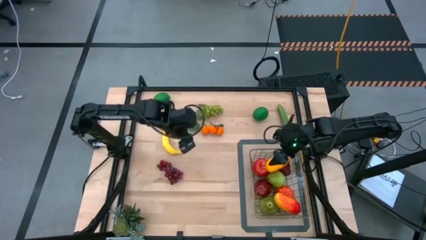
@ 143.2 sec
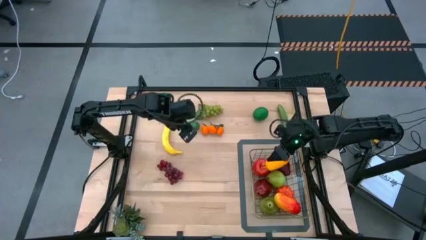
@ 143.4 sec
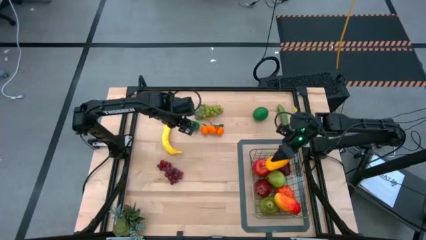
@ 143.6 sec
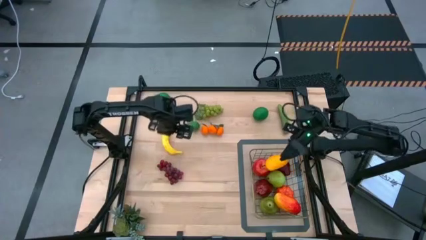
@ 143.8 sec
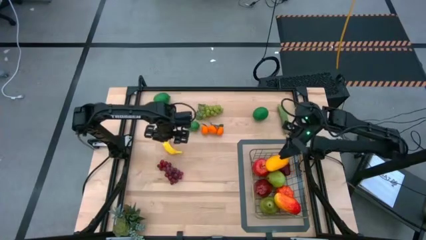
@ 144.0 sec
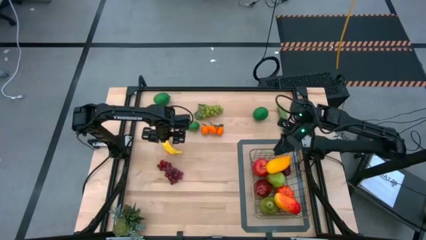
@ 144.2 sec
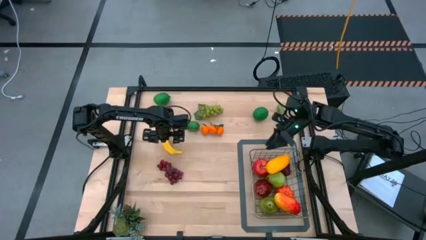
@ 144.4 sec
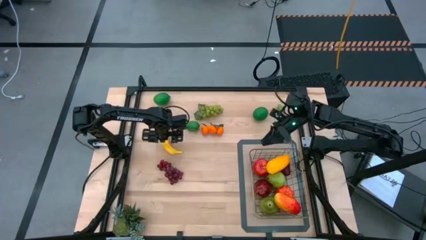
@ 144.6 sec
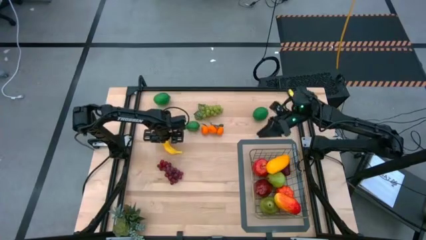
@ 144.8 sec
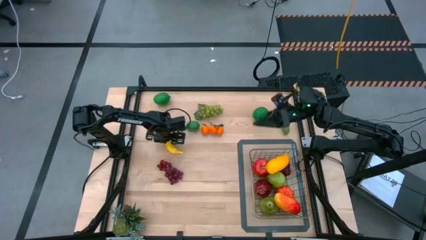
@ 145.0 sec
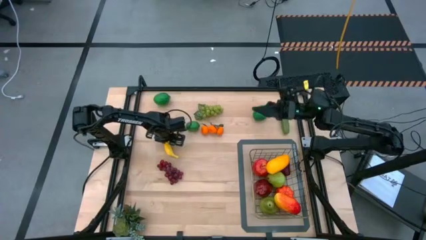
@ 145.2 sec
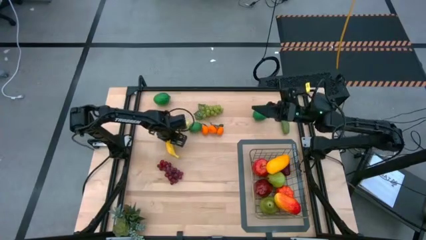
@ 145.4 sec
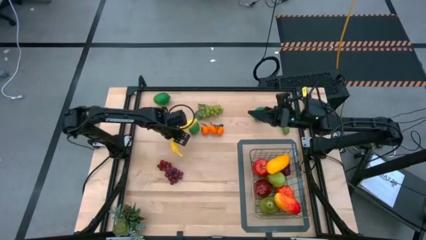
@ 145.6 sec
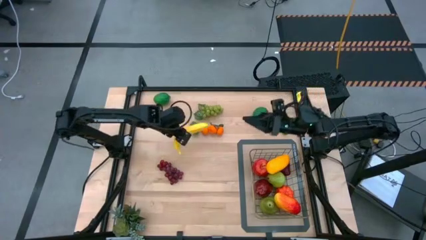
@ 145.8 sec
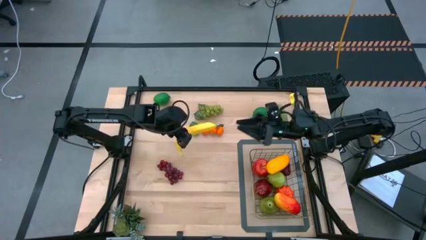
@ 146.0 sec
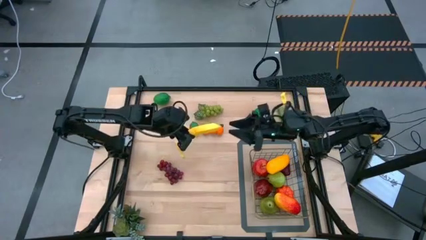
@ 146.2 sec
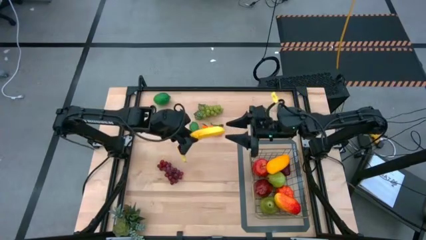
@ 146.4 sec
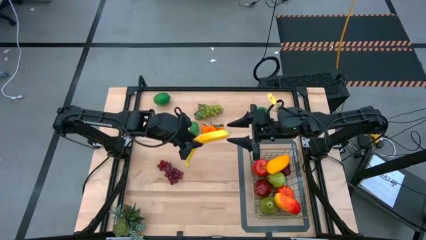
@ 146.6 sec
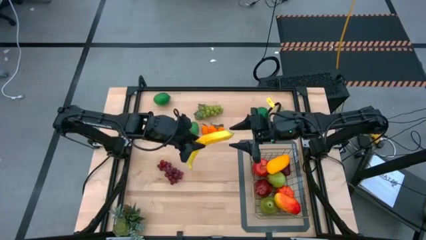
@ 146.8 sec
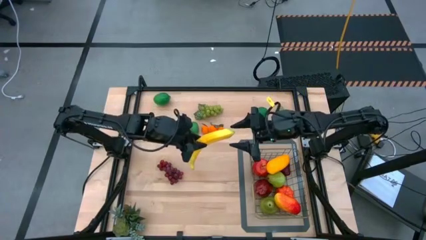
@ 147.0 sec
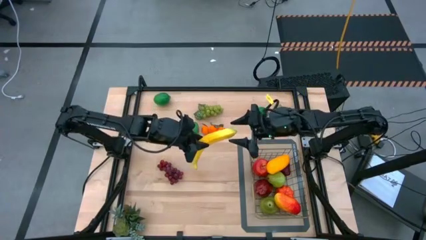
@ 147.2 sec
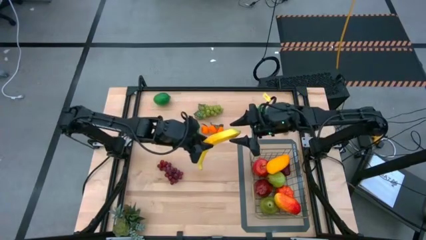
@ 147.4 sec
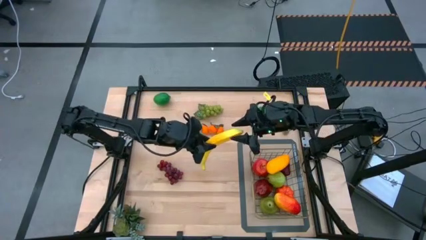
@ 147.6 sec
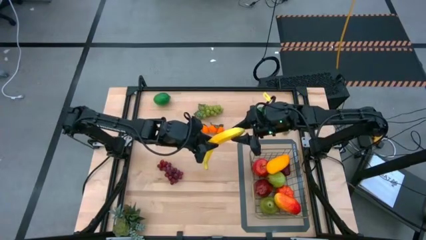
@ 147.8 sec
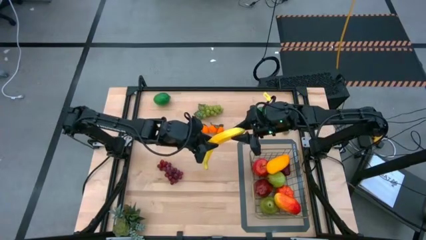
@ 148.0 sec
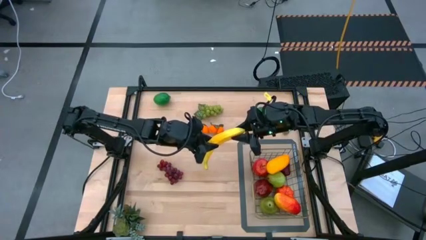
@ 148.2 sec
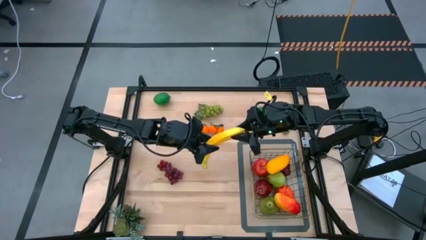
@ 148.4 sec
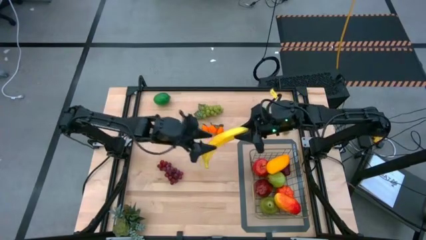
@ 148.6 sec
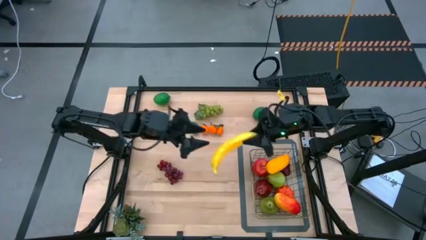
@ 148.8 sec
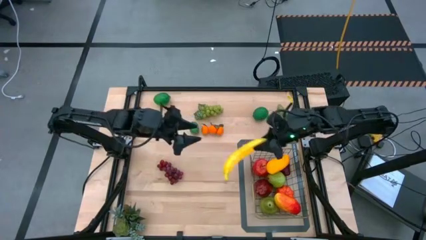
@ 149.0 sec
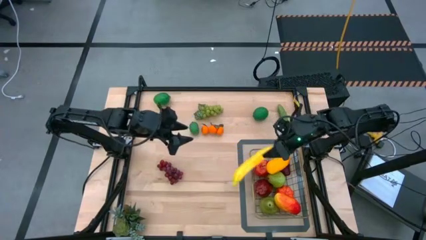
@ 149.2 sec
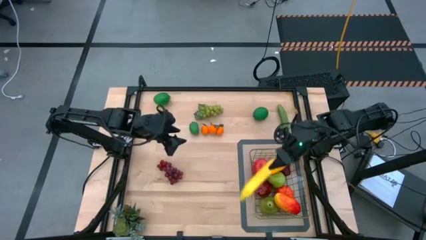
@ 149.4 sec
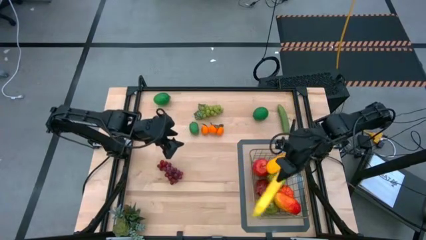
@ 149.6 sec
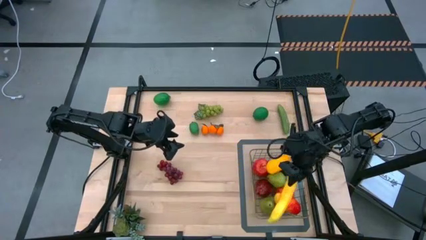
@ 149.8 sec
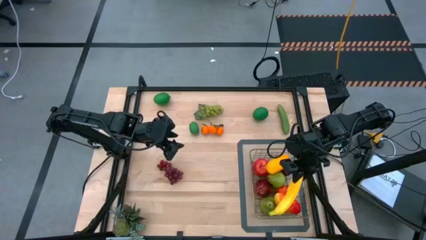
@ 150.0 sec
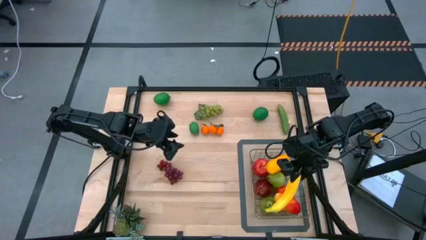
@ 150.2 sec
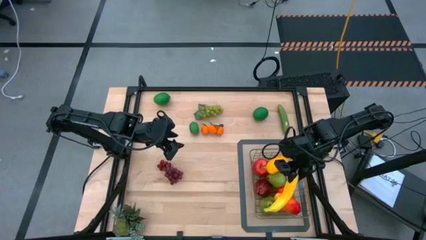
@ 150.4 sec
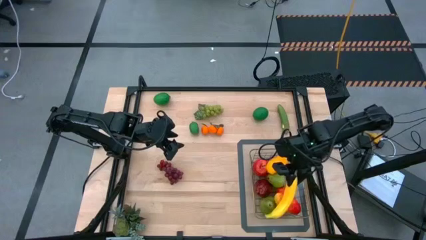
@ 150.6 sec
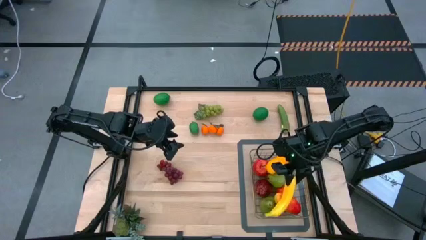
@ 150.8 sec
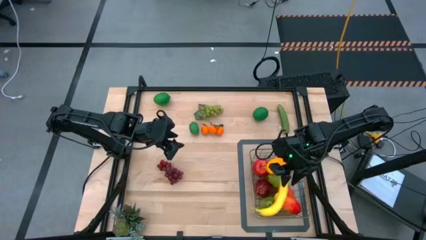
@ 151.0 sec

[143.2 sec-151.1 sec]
Task: Build produce basket
Put the yellow banana into the wire basket

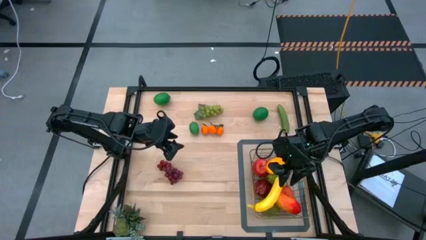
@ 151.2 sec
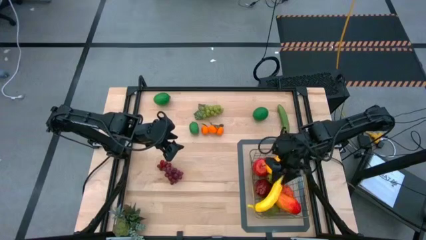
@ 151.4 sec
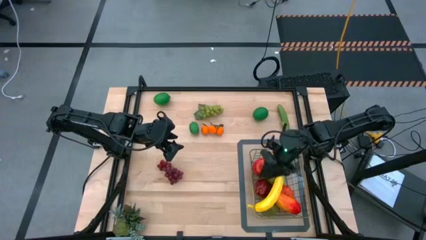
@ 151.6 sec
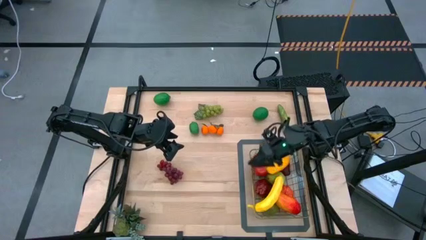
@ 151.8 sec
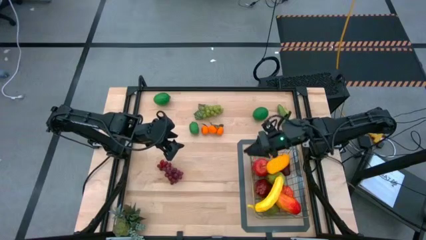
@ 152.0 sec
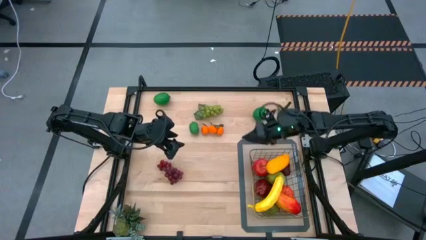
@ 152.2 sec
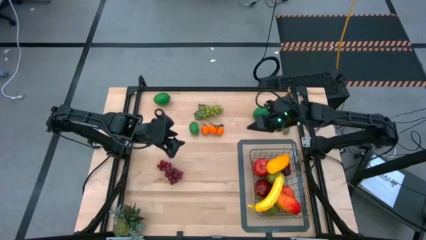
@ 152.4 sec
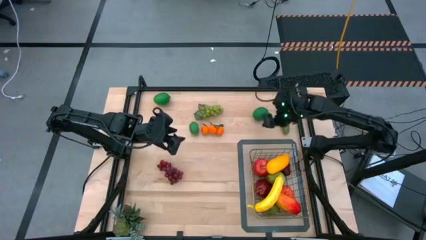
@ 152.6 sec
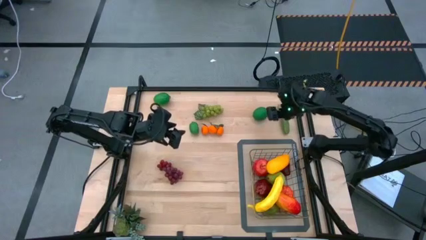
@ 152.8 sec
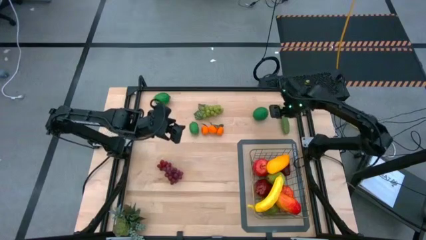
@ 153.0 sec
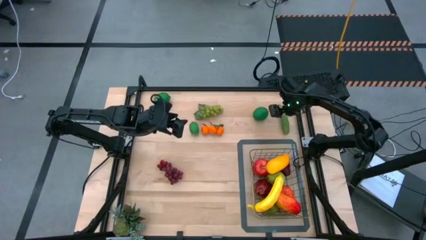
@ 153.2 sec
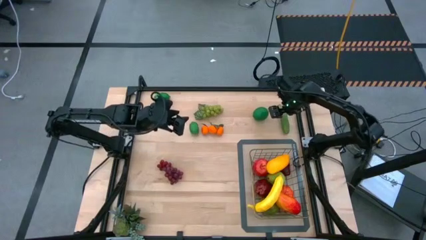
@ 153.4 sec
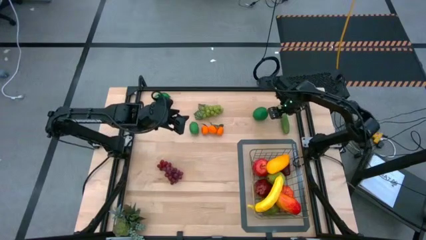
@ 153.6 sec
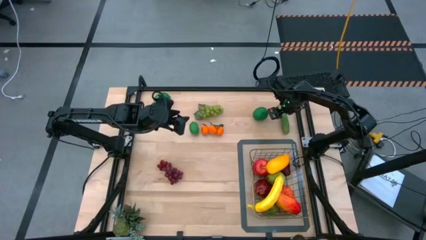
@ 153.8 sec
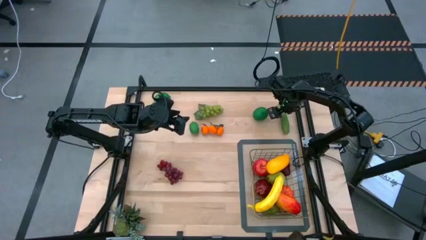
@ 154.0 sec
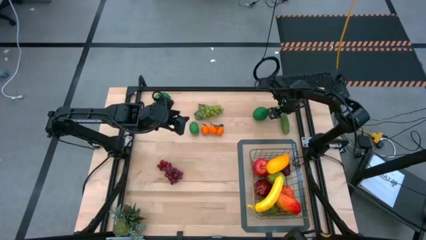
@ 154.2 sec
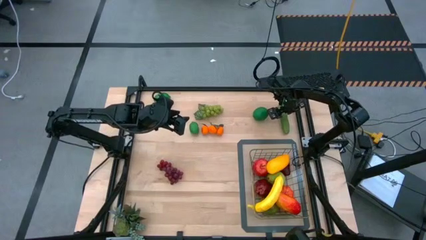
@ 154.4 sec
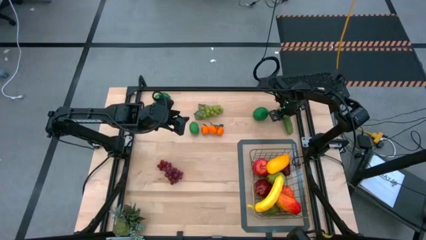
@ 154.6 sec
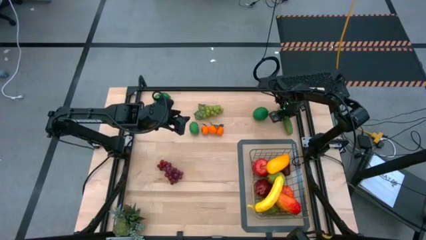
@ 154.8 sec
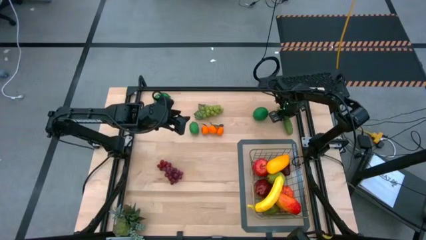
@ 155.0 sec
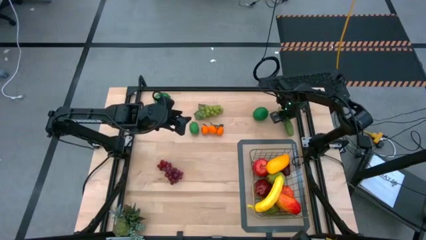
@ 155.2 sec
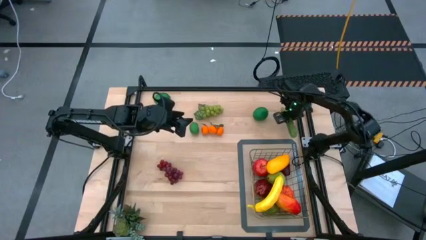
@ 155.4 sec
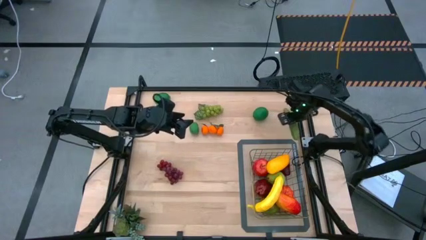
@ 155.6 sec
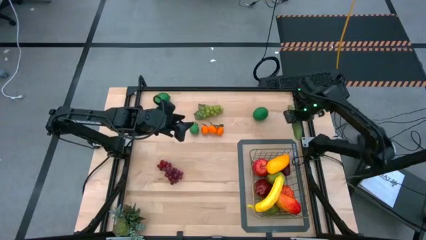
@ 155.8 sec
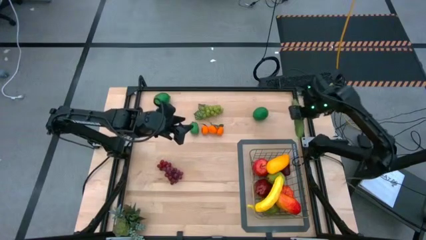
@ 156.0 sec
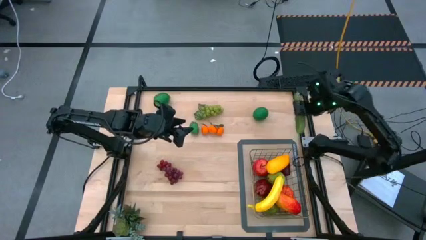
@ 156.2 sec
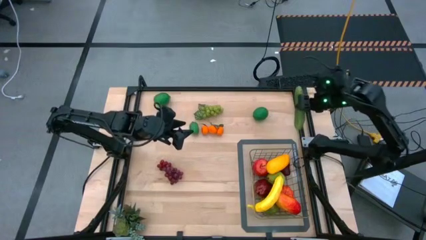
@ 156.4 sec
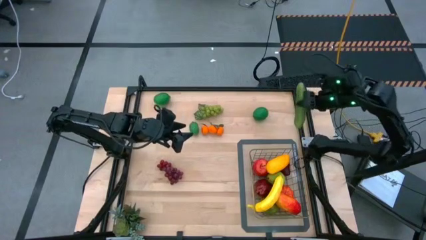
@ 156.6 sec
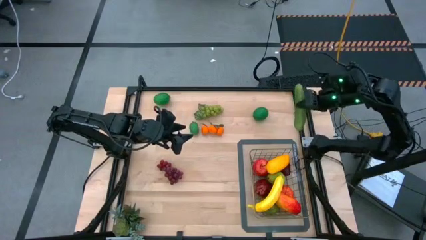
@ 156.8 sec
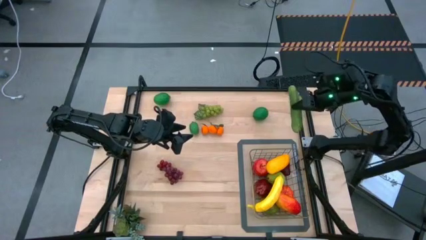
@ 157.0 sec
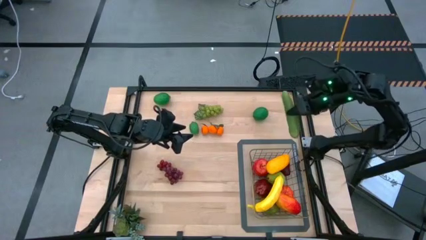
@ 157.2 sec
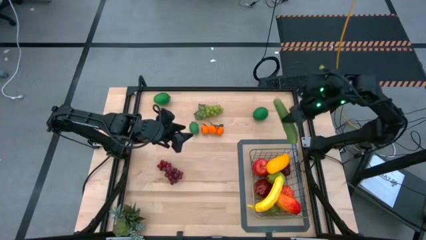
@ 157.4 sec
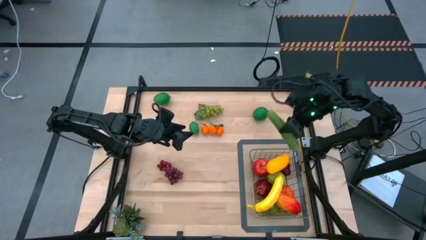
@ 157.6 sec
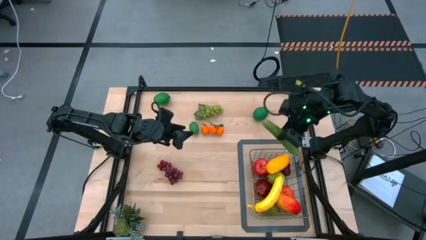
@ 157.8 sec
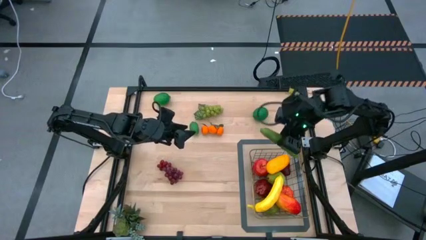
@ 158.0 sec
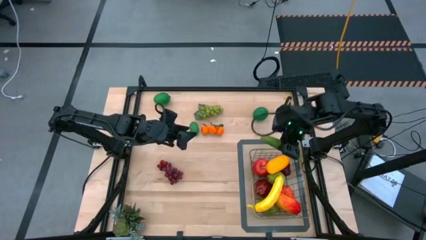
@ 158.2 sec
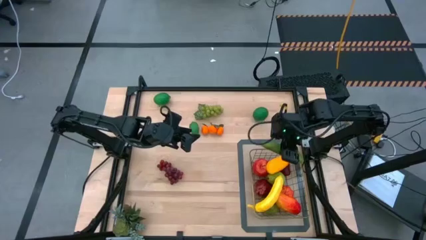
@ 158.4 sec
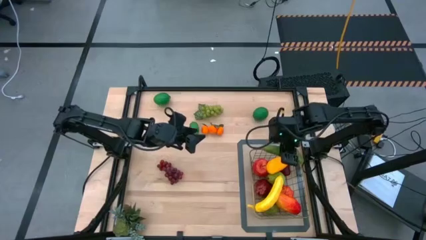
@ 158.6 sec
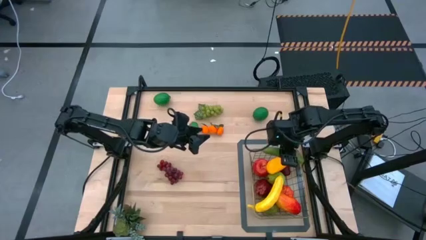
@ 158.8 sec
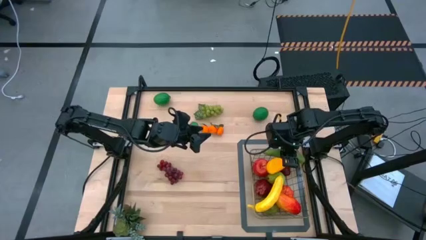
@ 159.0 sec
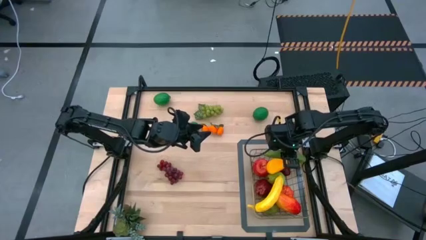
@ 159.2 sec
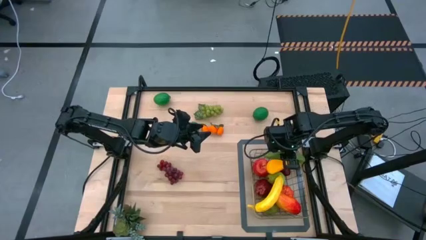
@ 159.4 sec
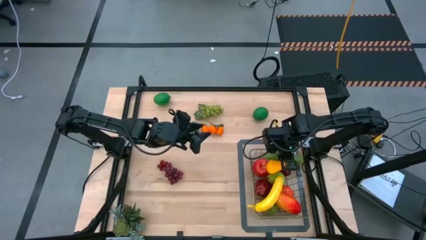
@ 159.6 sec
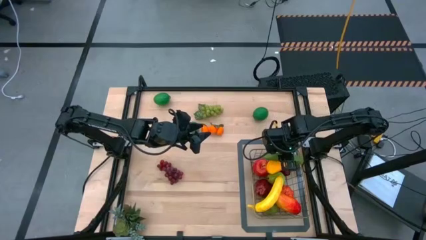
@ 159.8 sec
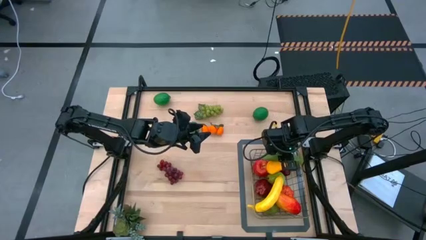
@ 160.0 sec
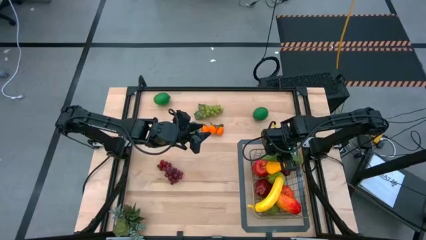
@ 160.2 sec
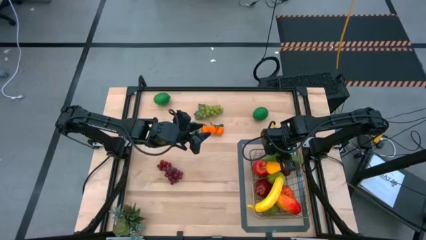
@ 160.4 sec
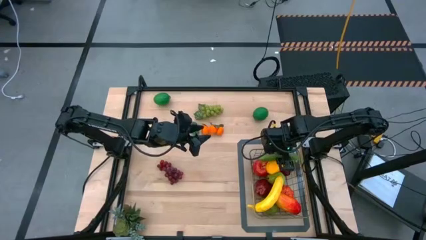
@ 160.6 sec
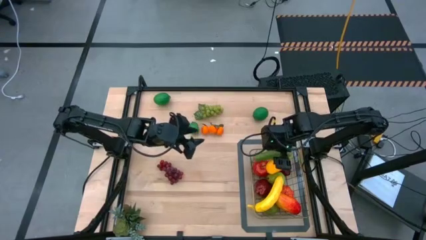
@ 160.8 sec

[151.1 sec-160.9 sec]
Put the green cucumber into the wire basket
